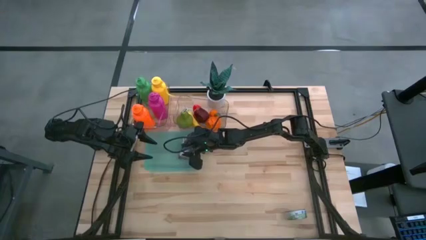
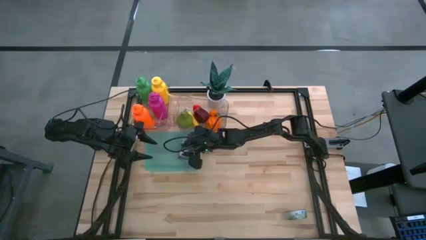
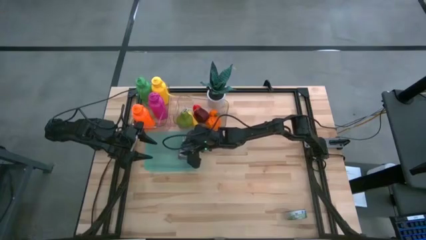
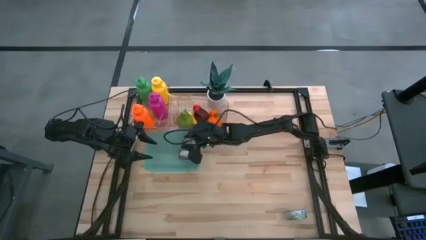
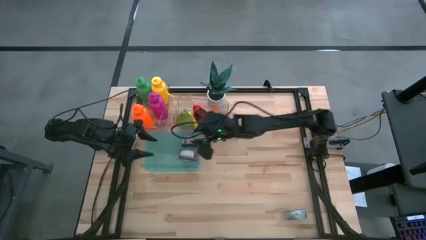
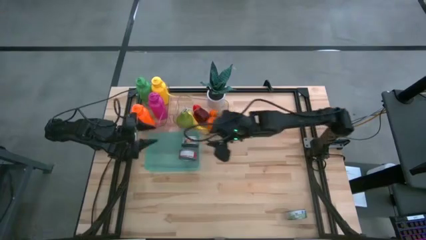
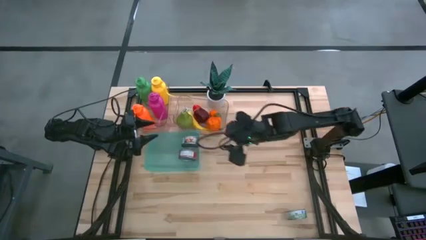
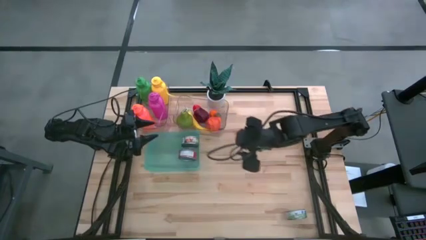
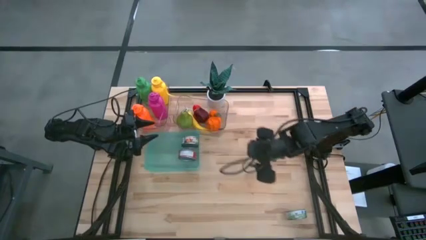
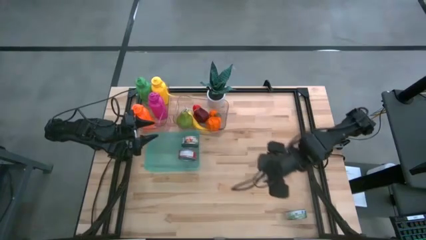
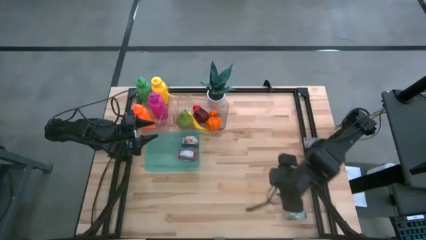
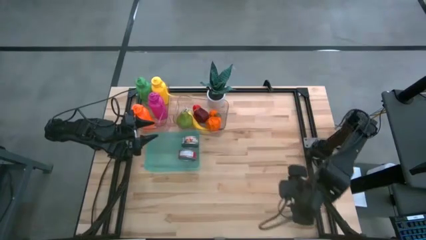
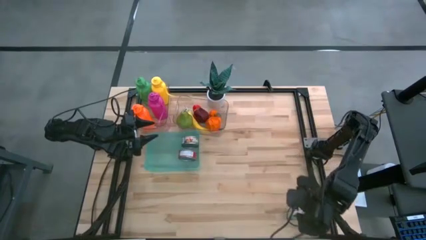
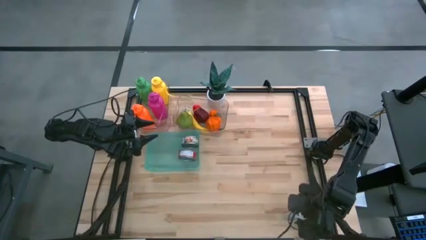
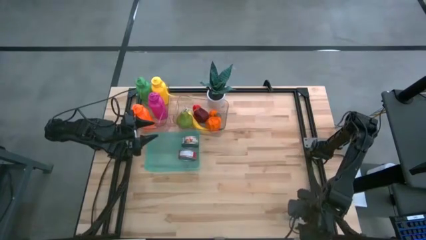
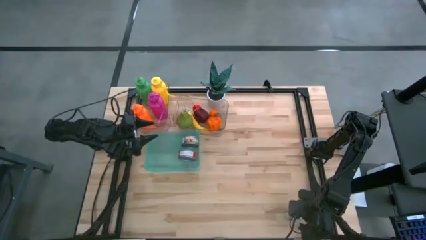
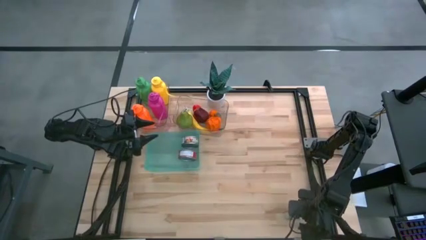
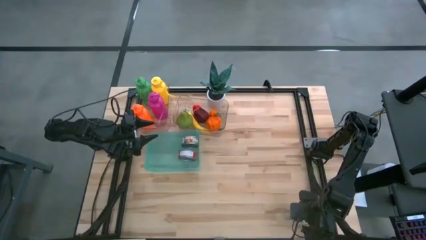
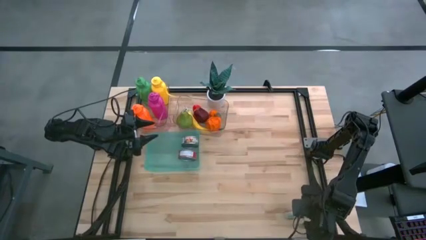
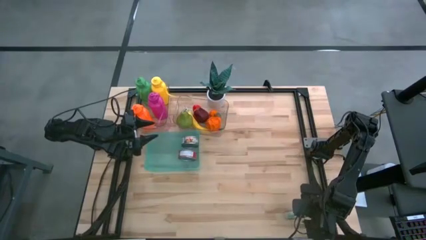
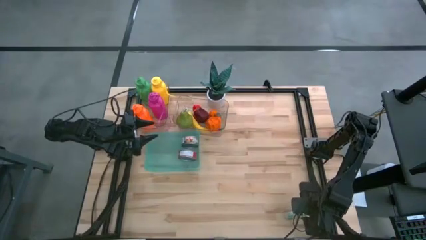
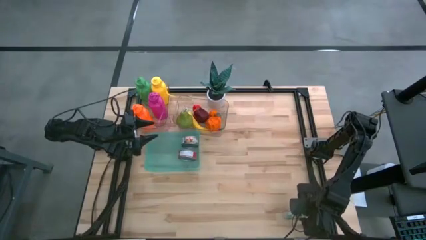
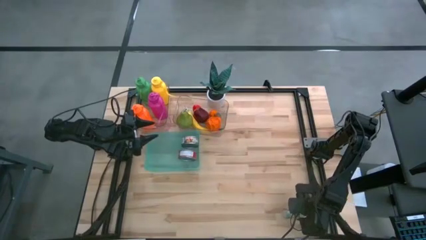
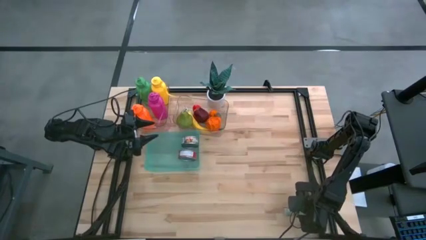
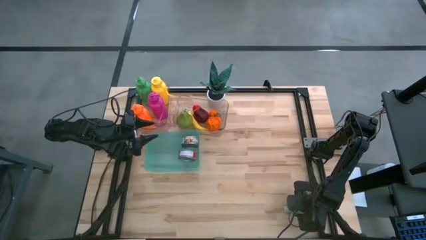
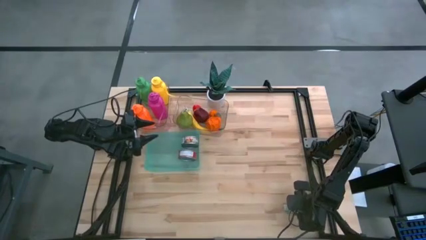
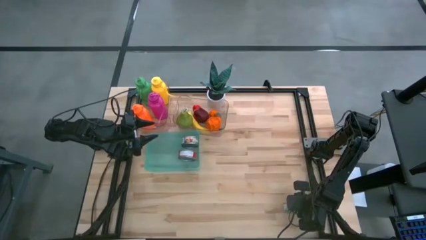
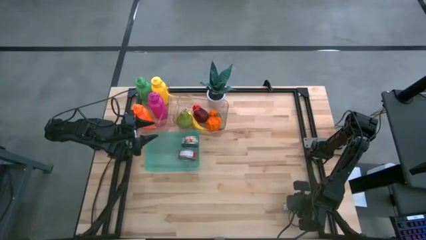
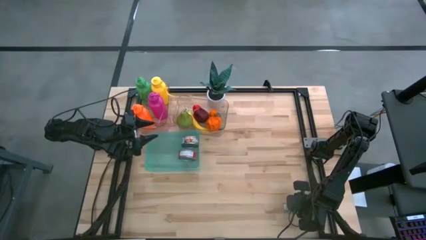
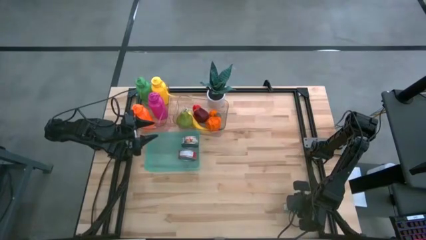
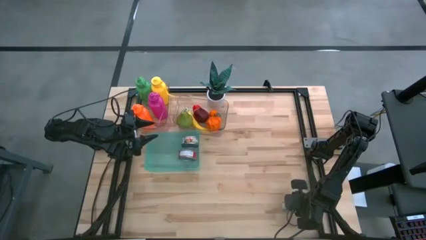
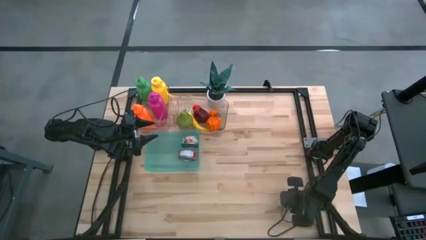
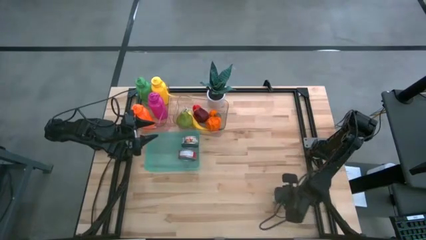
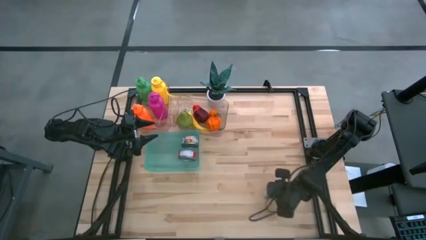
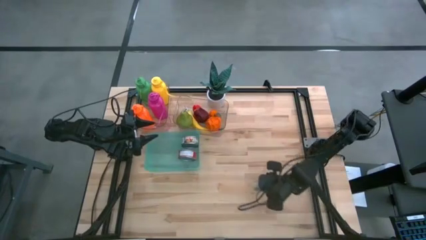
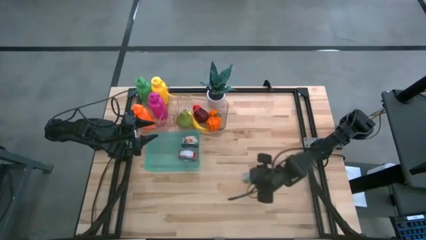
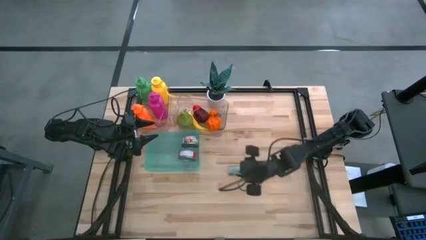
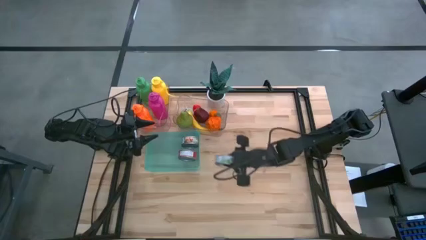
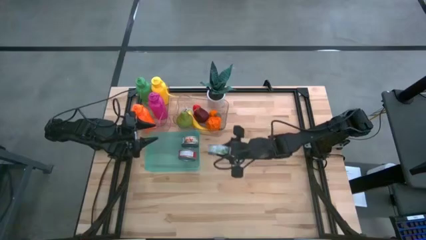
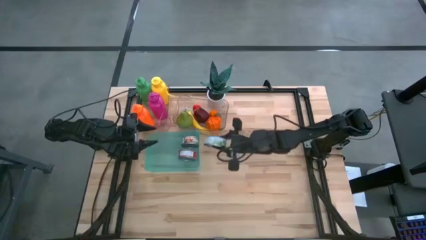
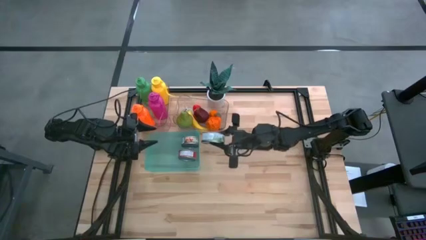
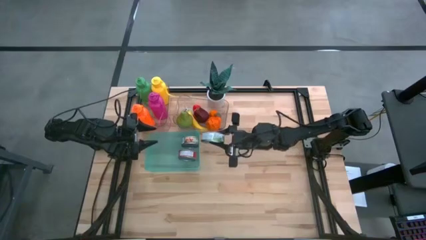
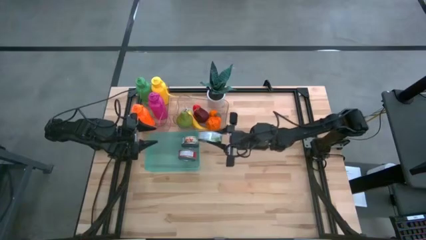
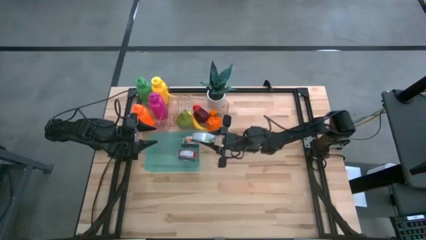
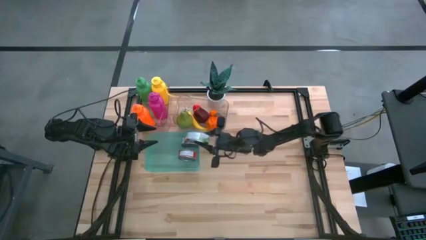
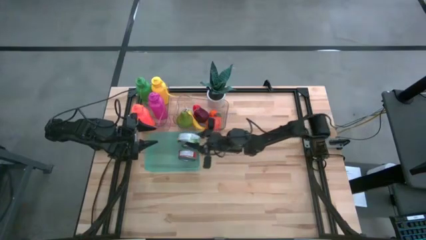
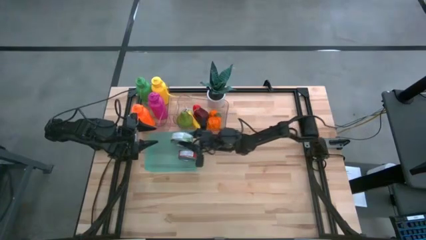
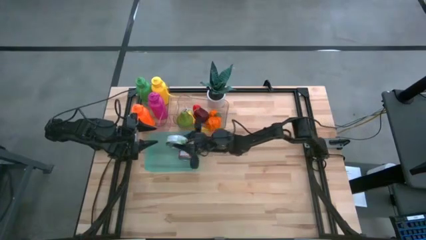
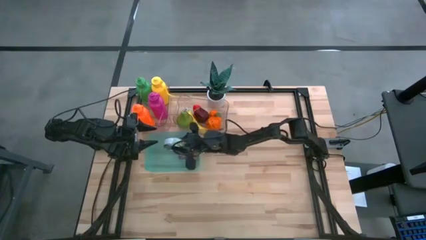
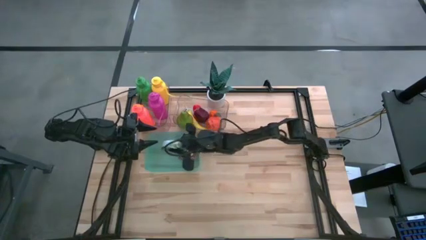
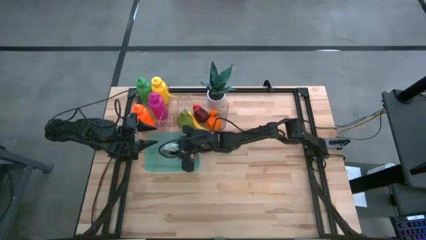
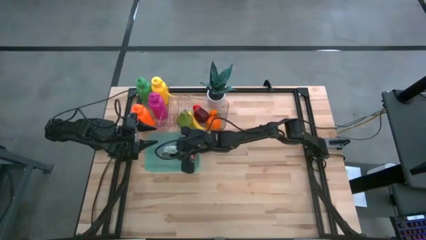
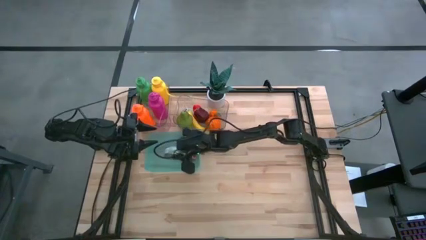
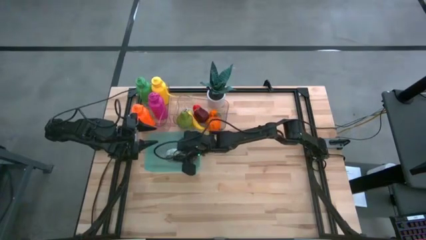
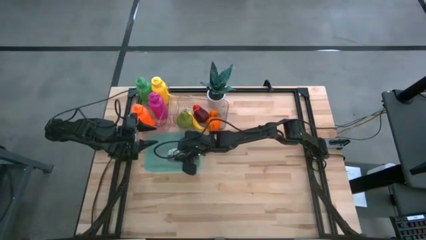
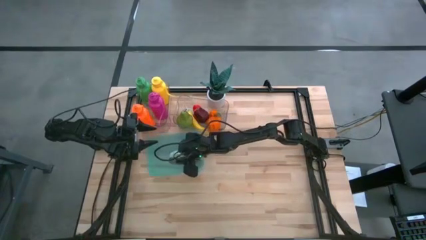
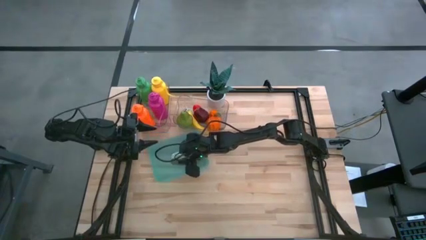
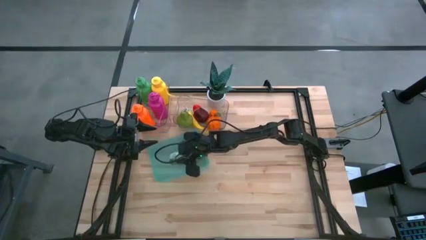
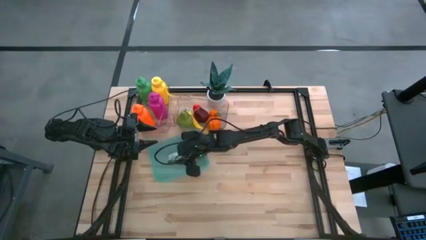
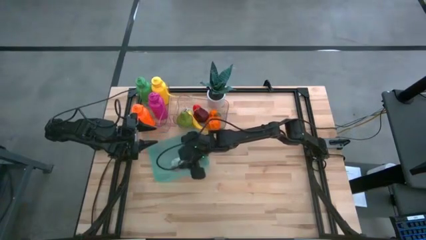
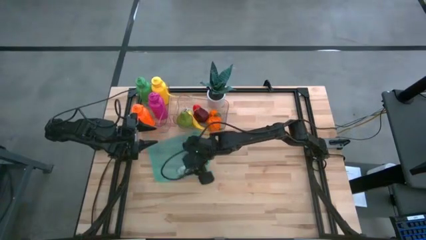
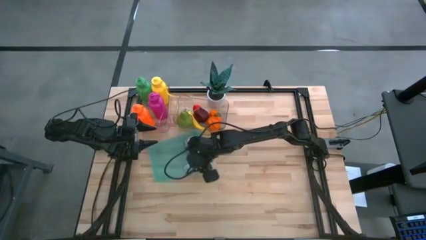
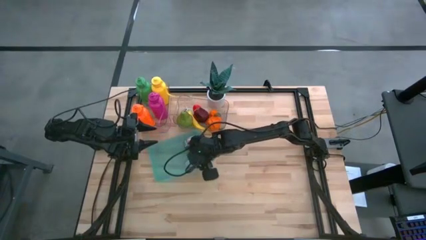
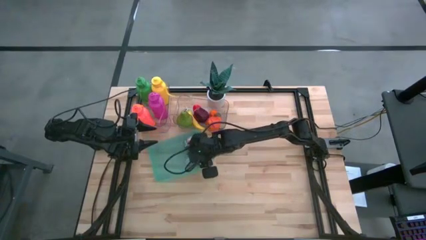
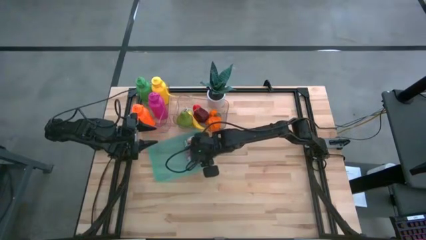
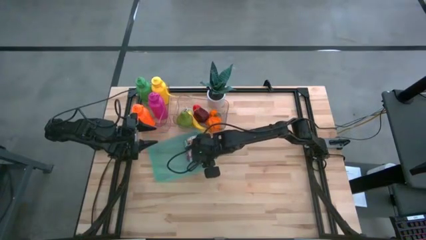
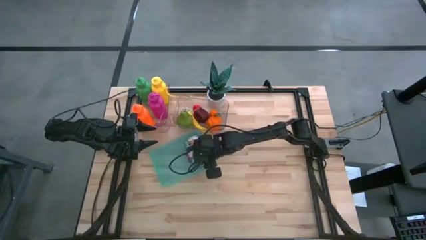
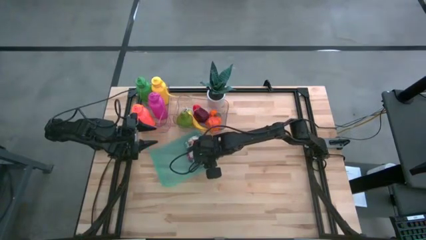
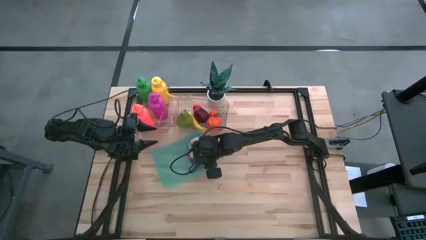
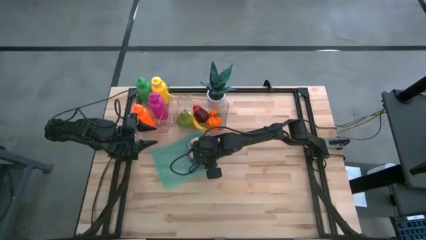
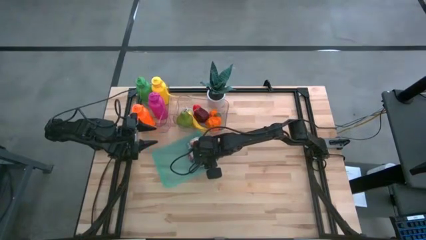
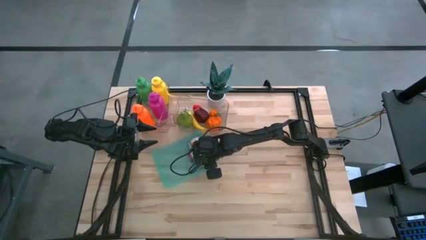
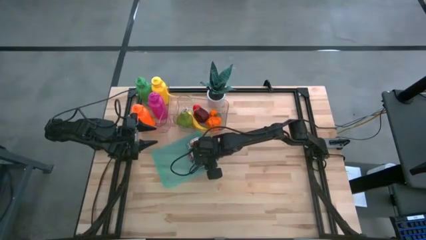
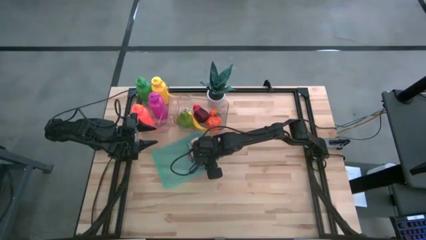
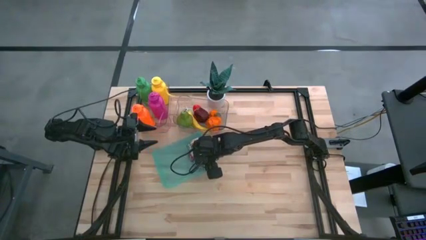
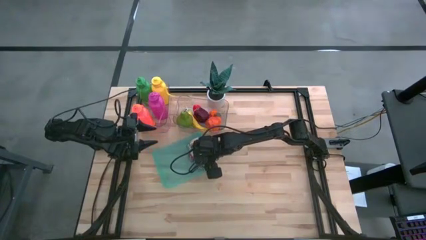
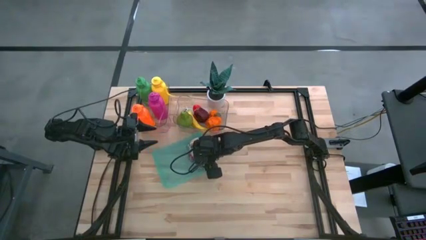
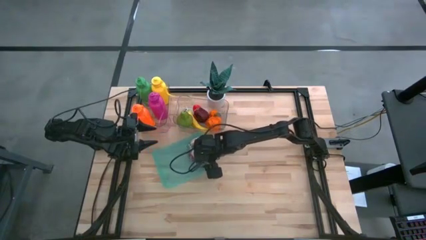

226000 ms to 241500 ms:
Task: Pick & Place Food Item
Put the green tuna can into the blue bin

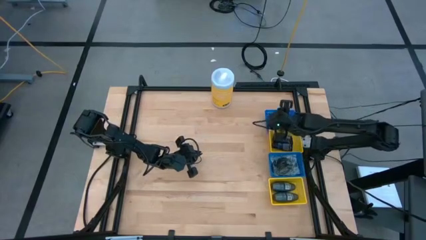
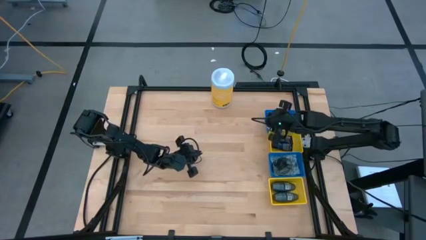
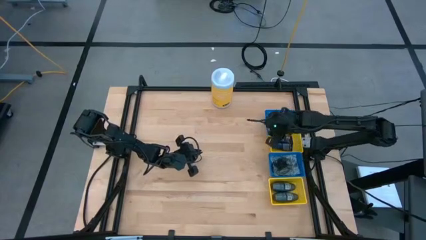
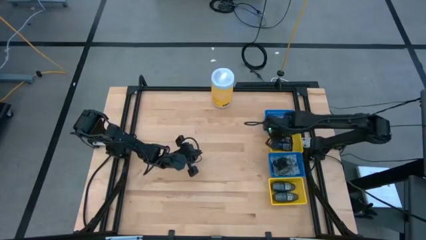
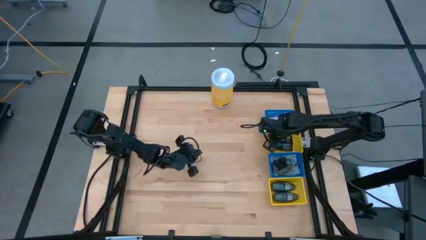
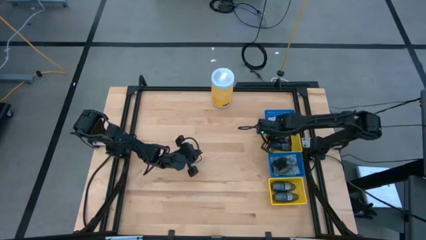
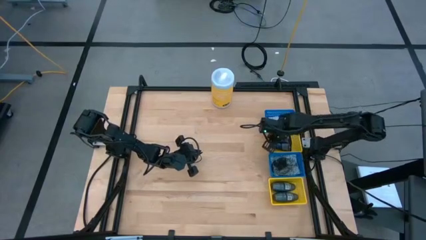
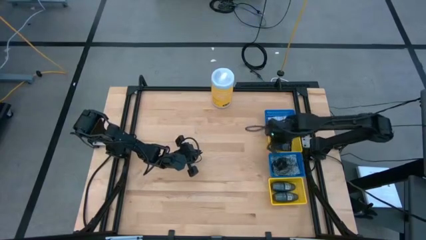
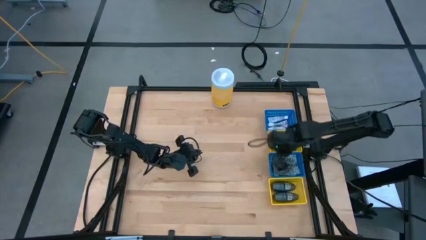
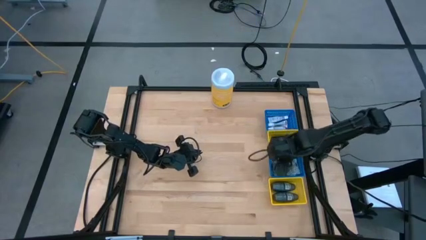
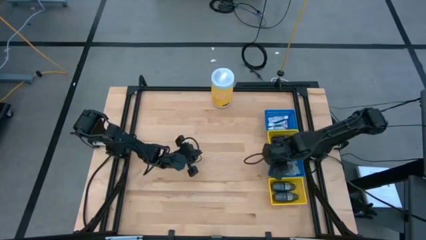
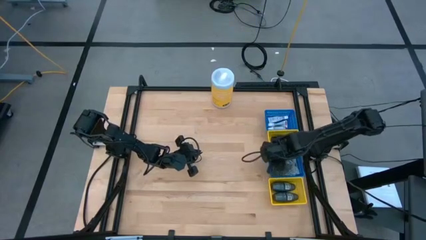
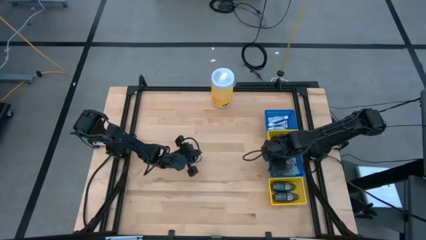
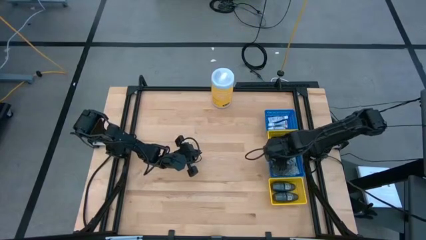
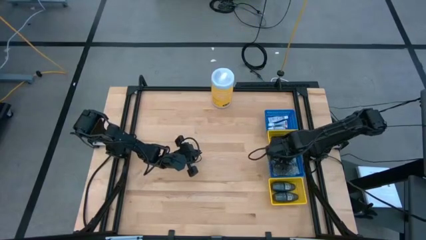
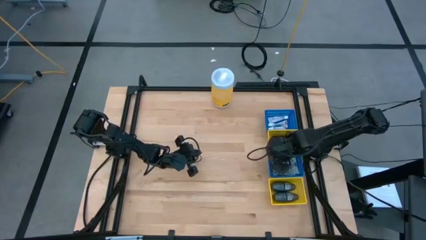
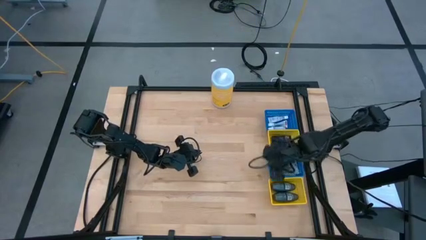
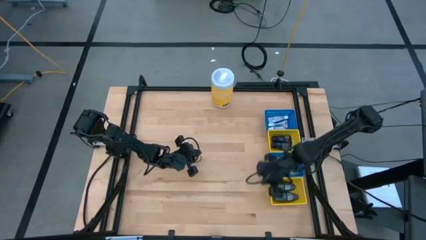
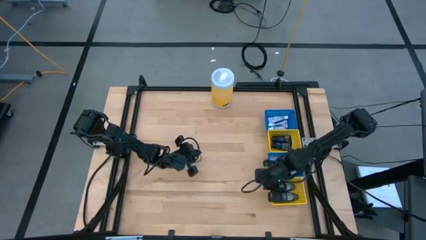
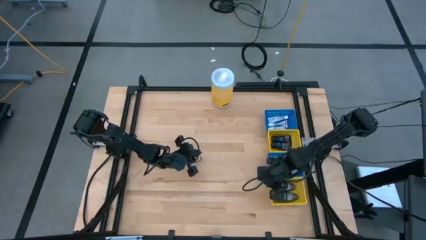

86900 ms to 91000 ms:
Task: Pick & Place Travel size toiletries
Adjust the bins
